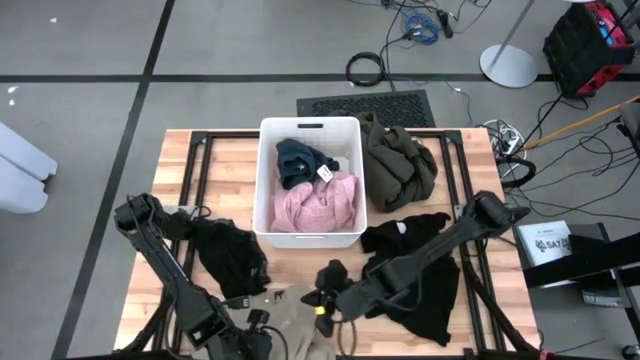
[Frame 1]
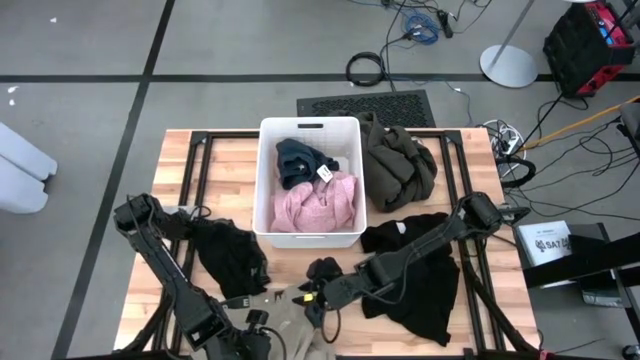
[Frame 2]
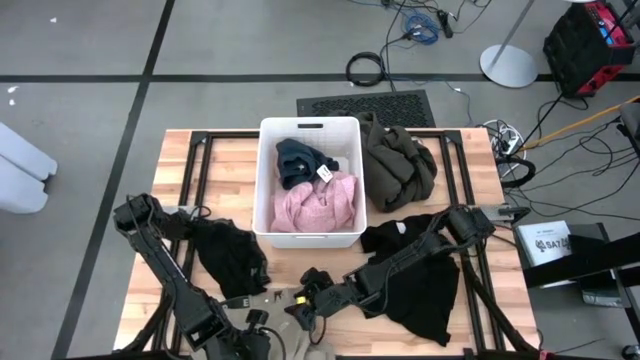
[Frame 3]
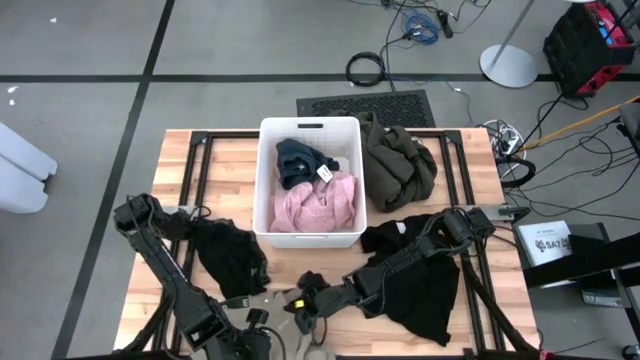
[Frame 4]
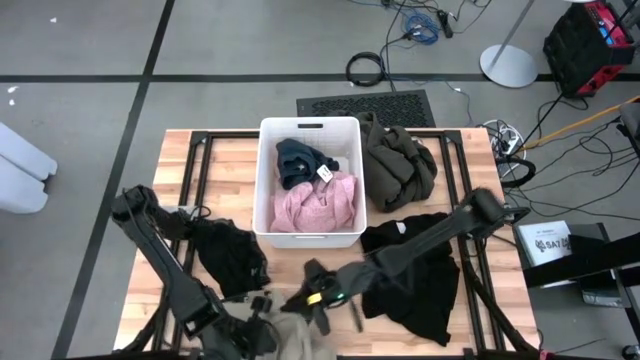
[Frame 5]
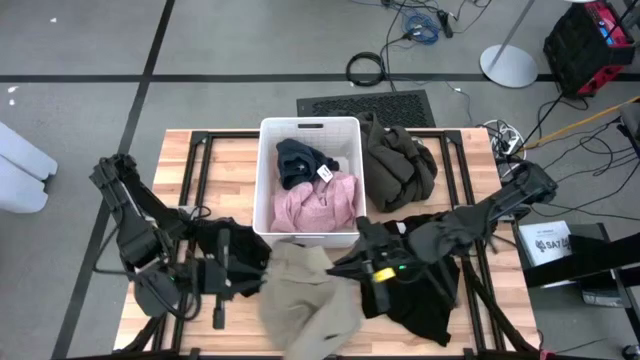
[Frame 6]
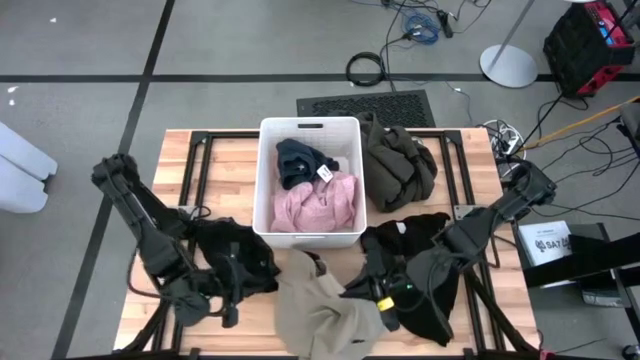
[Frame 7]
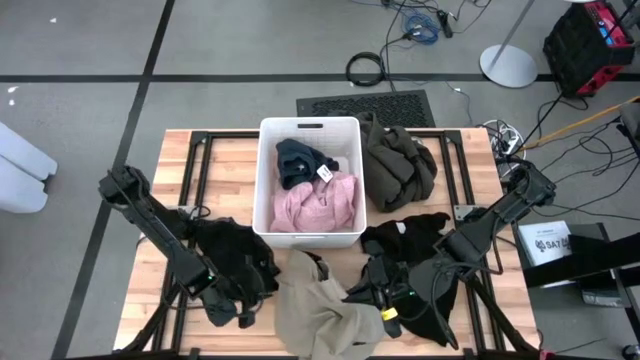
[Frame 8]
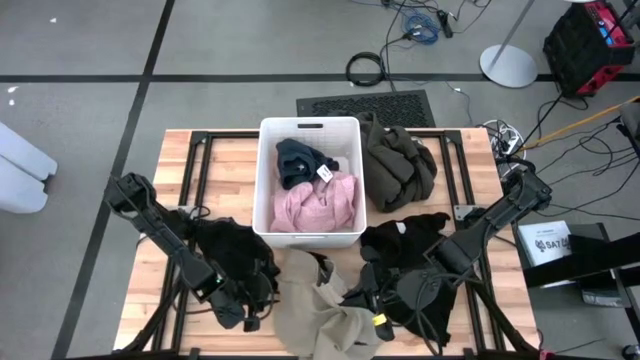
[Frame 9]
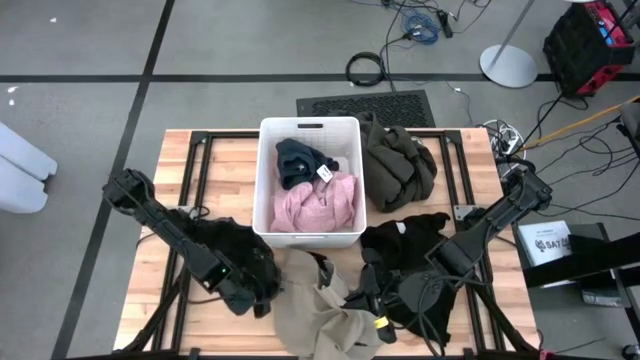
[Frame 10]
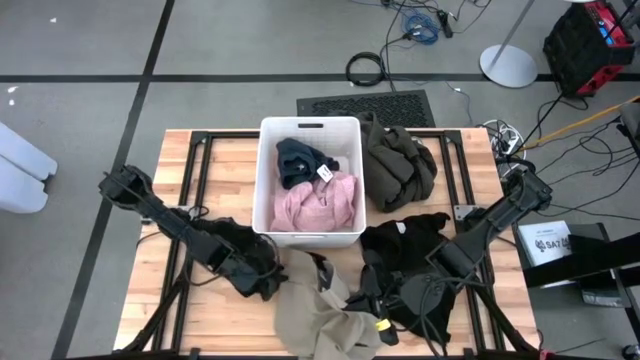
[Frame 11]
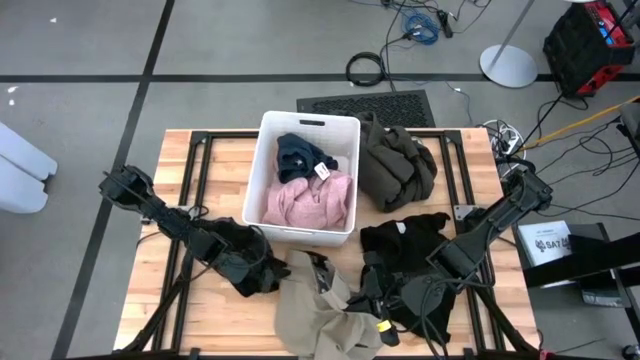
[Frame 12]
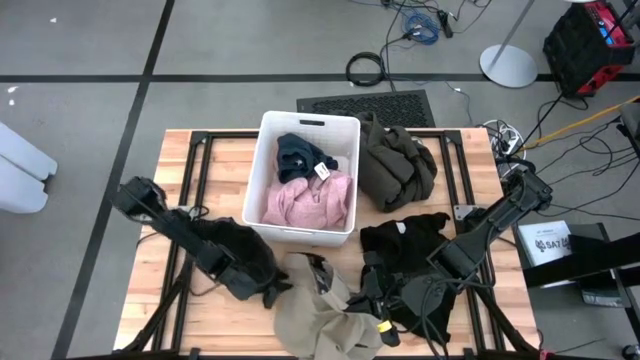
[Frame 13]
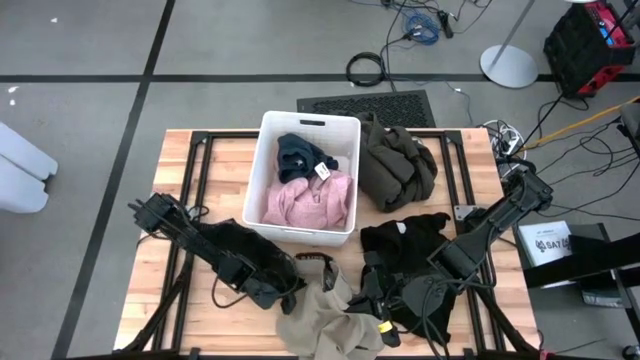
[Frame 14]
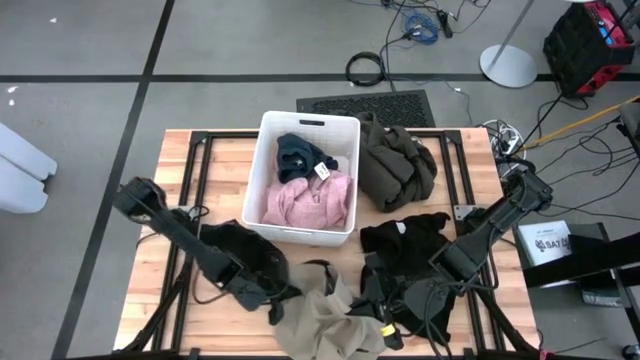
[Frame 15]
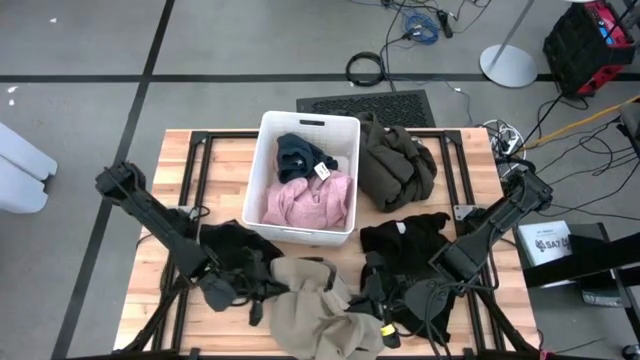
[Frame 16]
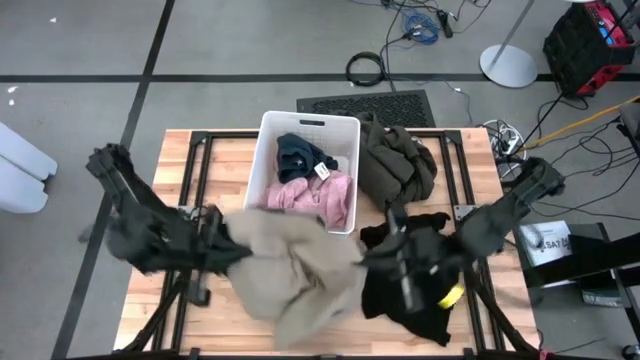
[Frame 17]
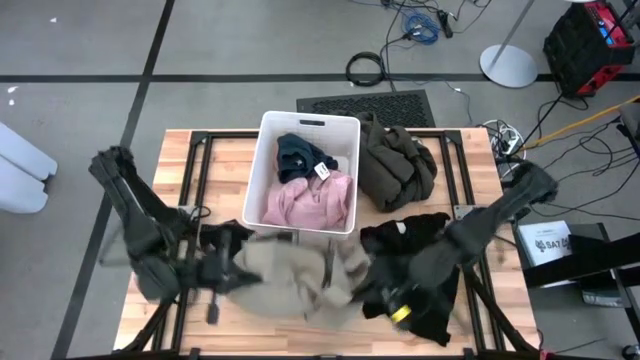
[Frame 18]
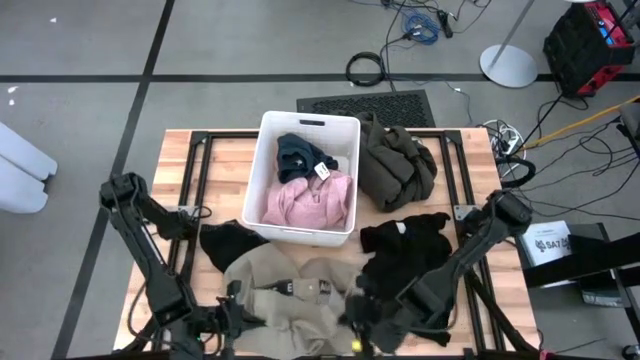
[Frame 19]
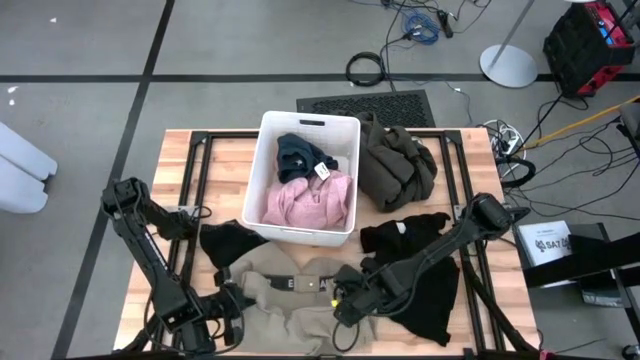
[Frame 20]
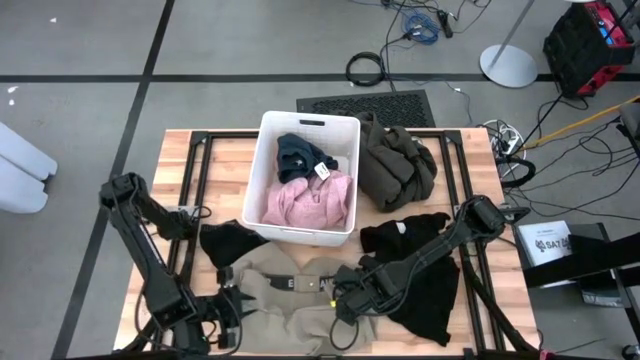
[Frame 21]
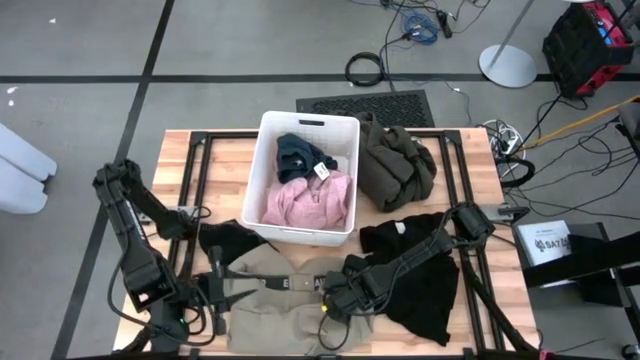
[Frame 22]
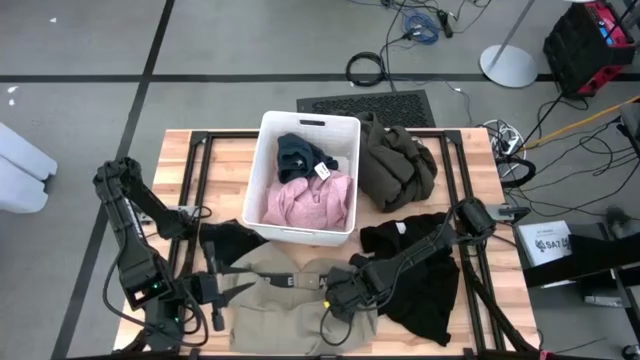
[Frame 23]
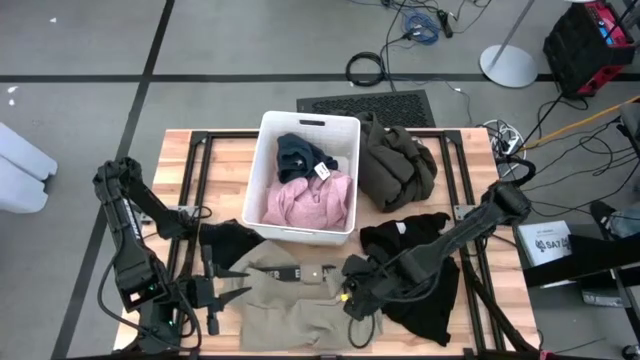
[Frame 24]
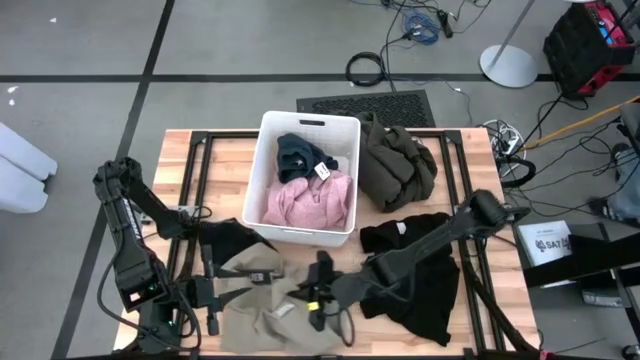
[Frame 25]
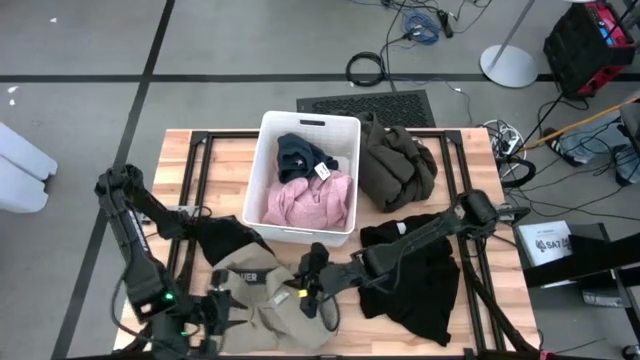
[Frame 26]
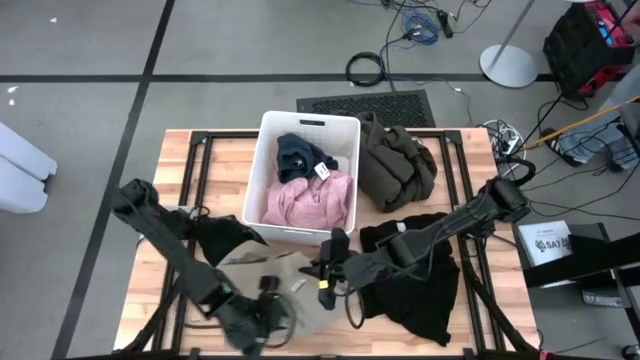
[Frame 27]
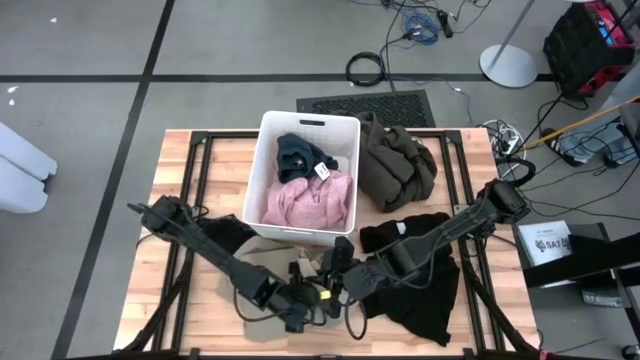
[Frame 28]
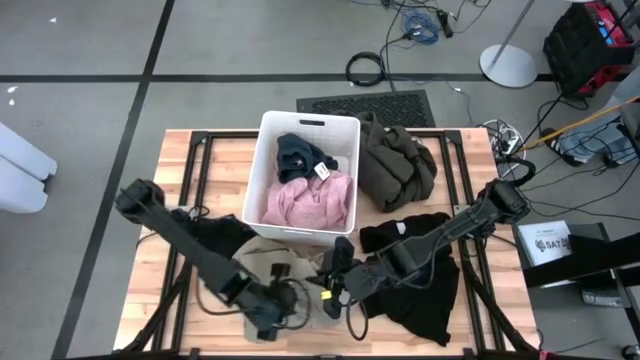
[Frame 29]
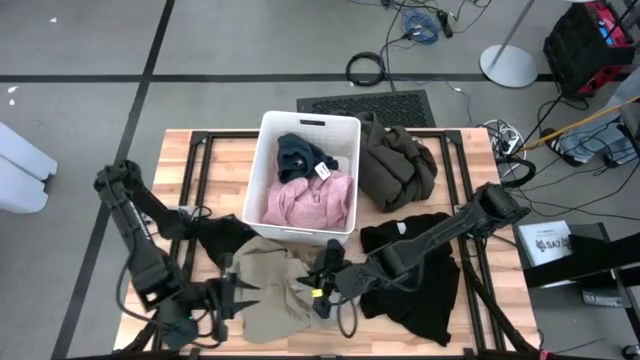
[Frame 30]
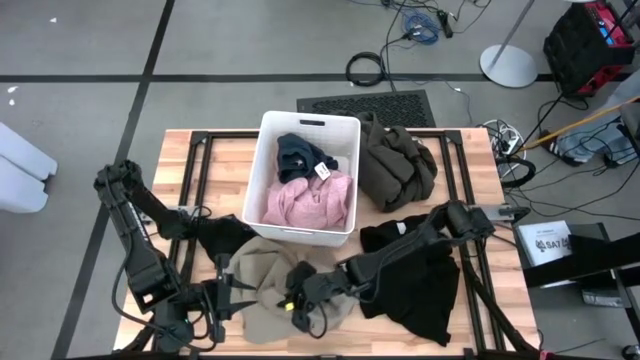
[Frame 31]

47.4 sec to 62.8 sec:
Task: Sort clothes
Put the brown shorts into the white laundry bin

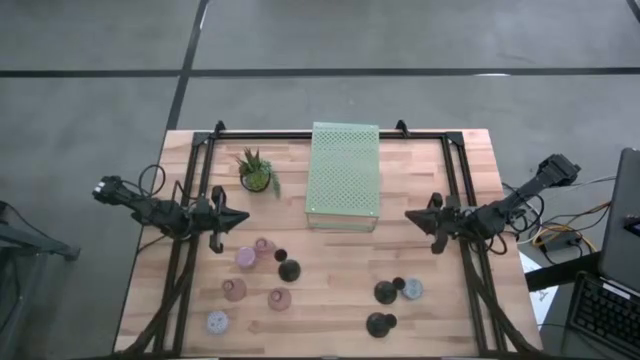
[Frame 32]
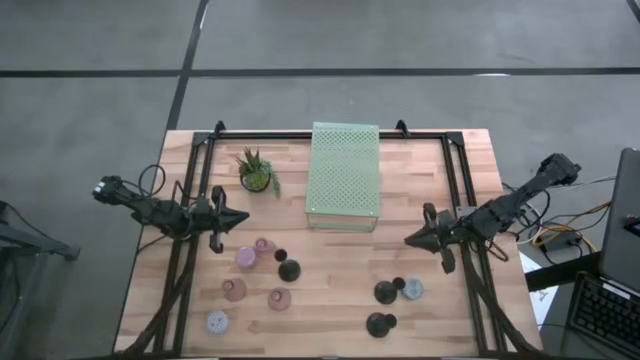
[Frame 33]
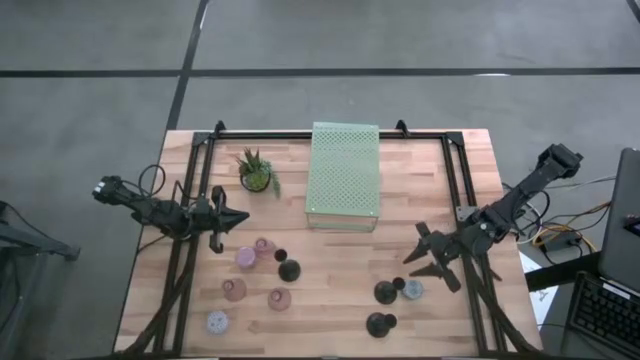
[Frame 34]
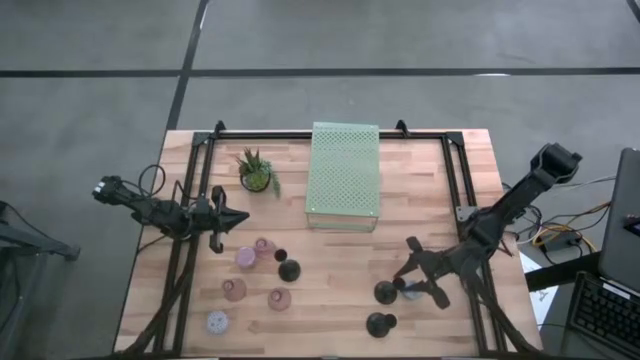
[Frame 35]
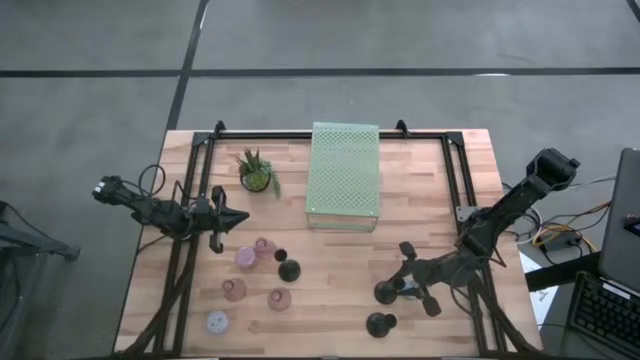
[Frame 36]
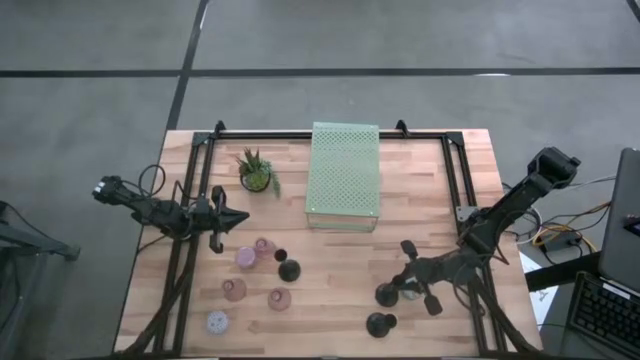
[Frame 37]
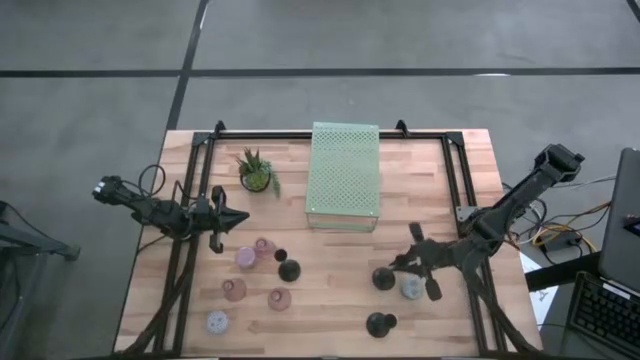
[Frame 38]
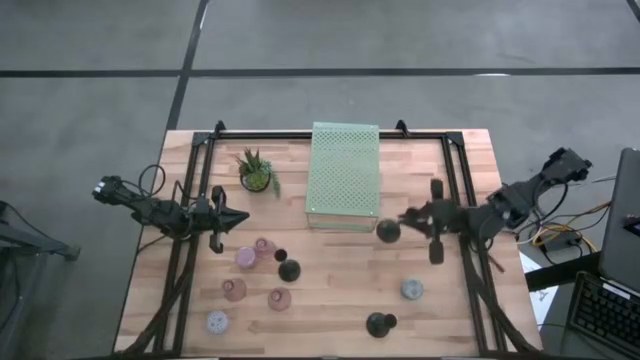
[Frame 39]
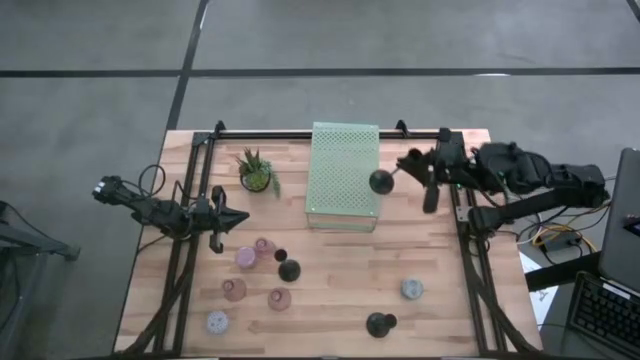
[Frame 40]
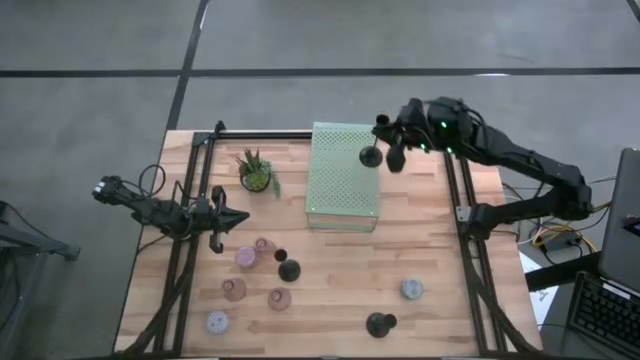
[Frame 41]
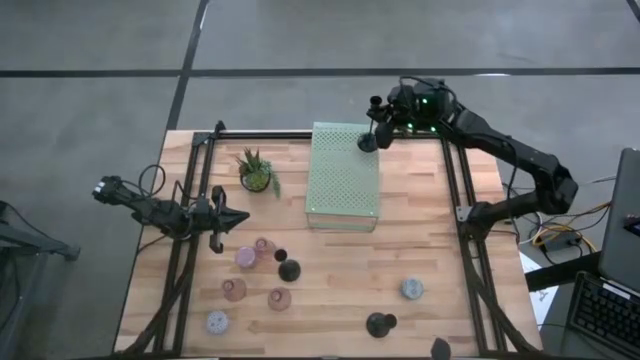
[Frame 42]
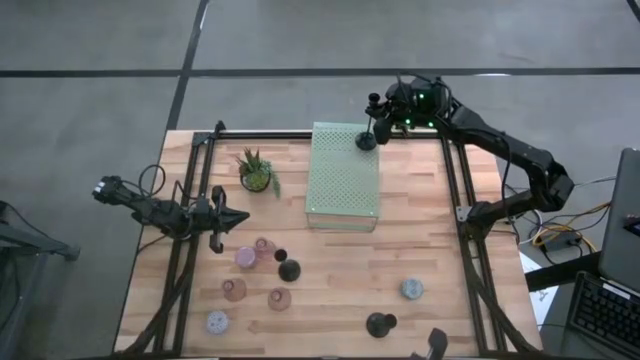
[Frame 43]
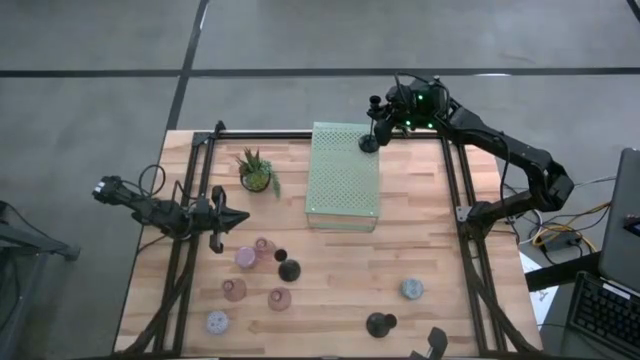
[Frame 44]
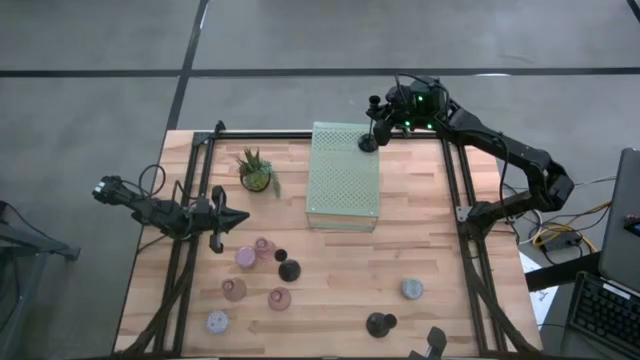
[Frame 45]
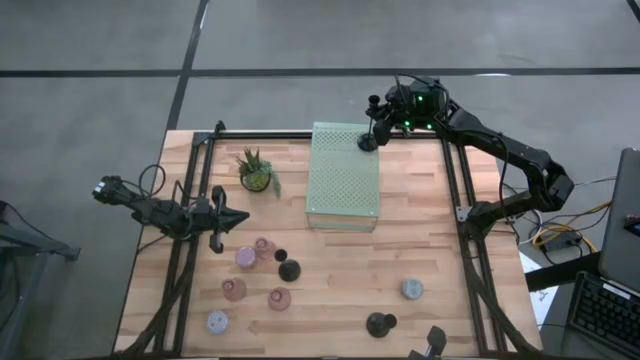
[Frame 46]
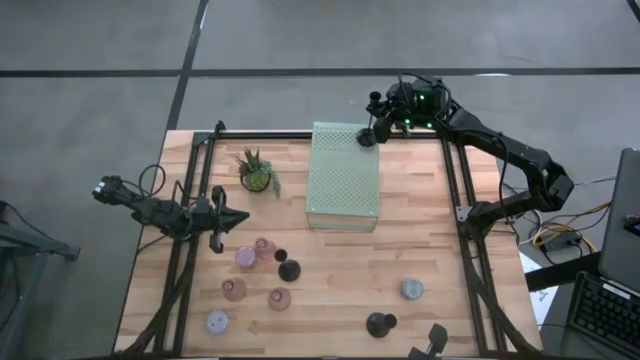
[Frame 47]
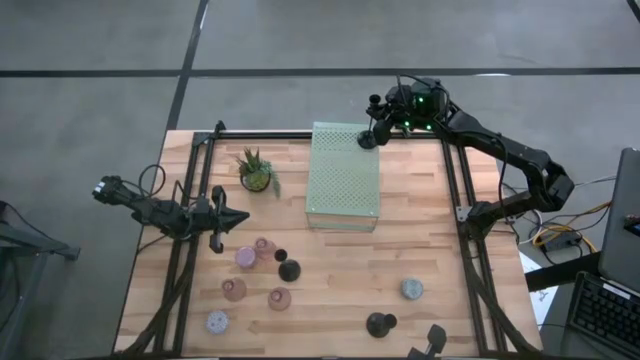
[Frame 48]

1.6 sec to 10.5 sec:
Task: Pick & Place candle stick holders
Put the top right black candle holder on the shelf
